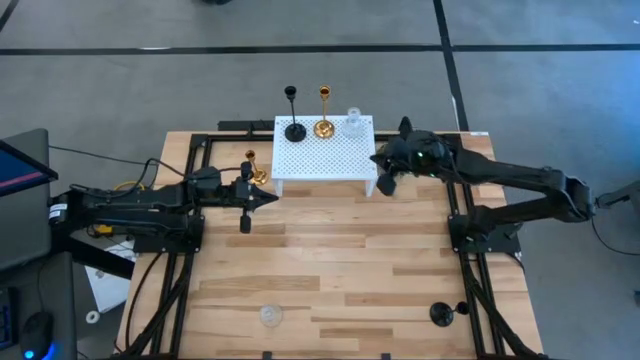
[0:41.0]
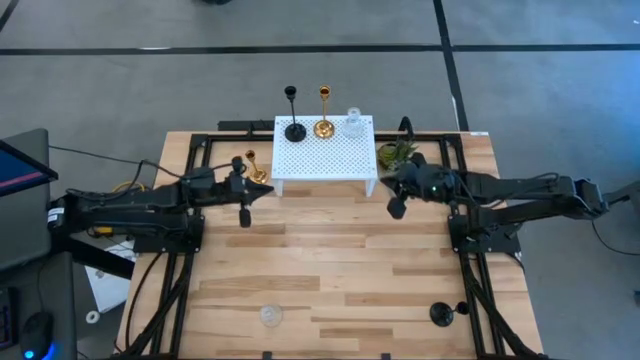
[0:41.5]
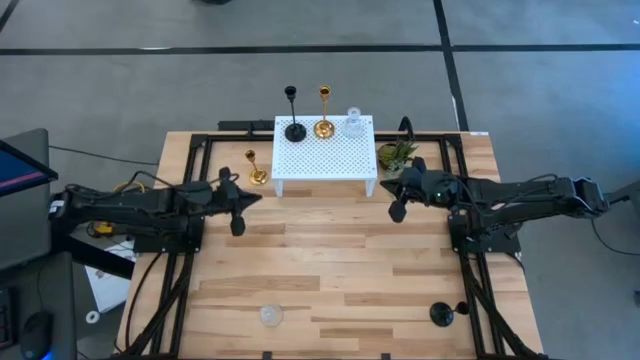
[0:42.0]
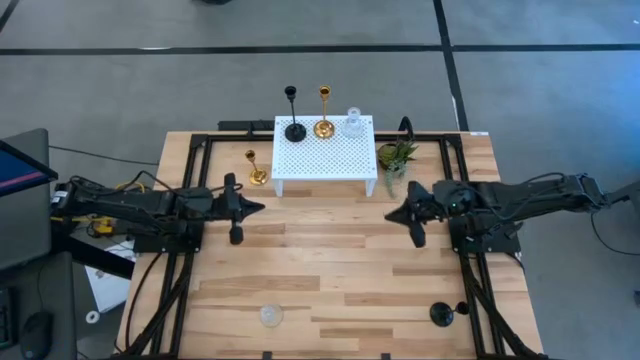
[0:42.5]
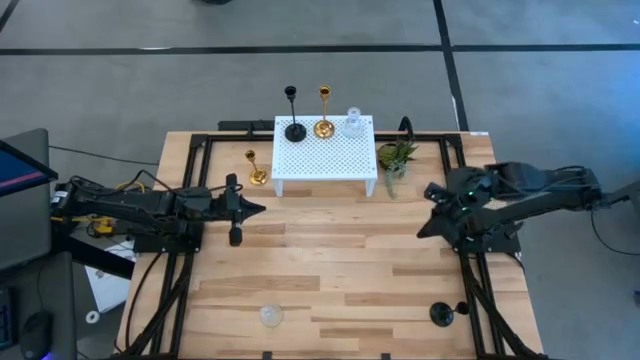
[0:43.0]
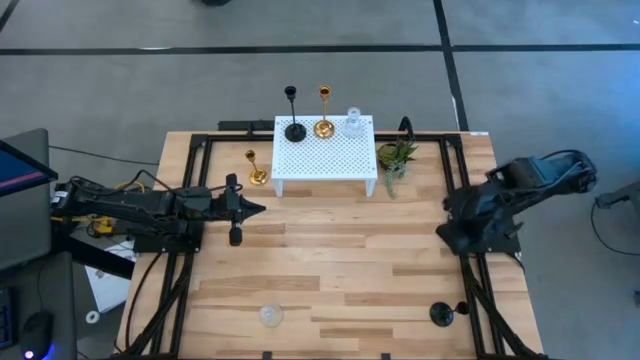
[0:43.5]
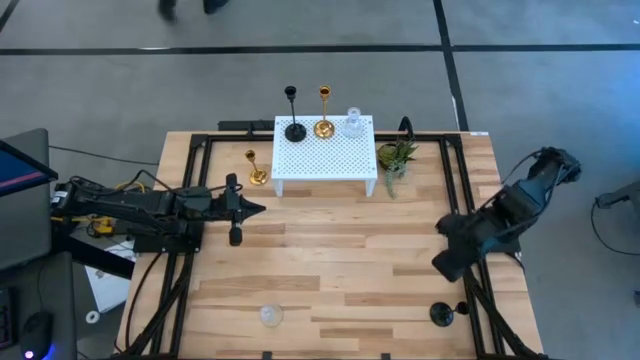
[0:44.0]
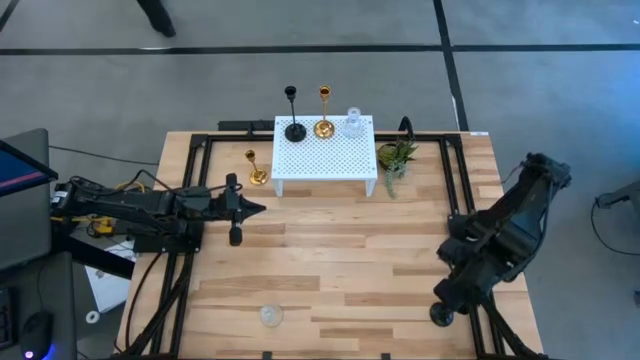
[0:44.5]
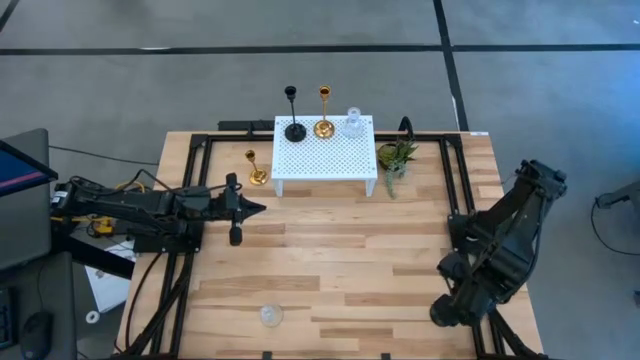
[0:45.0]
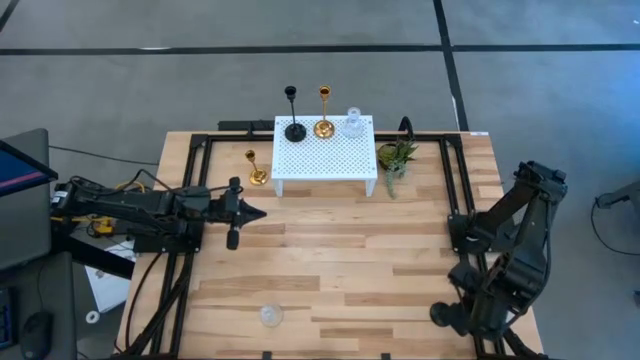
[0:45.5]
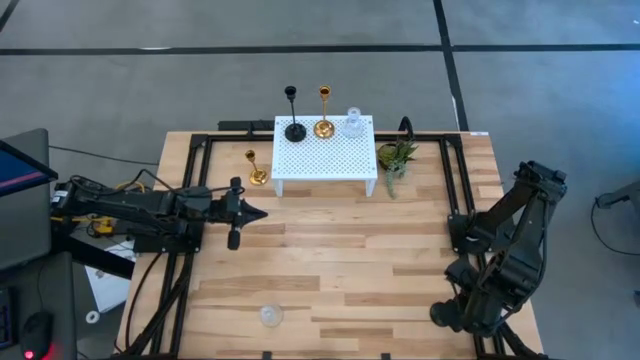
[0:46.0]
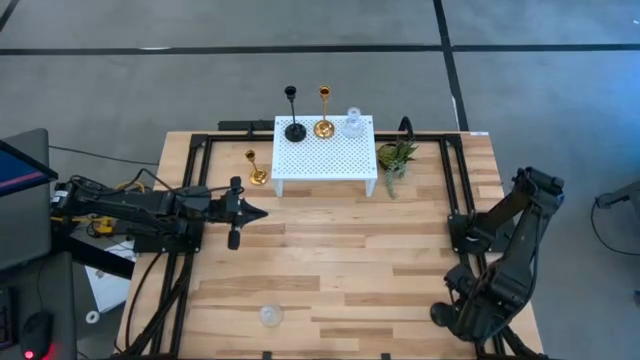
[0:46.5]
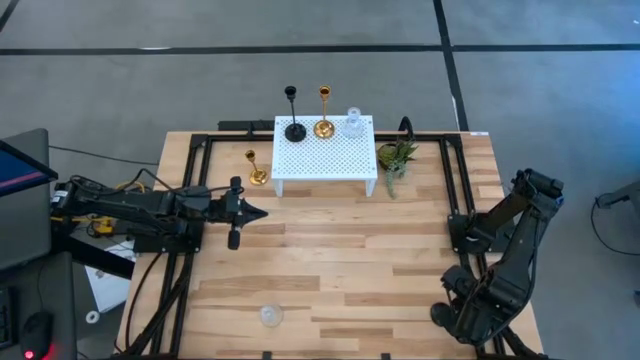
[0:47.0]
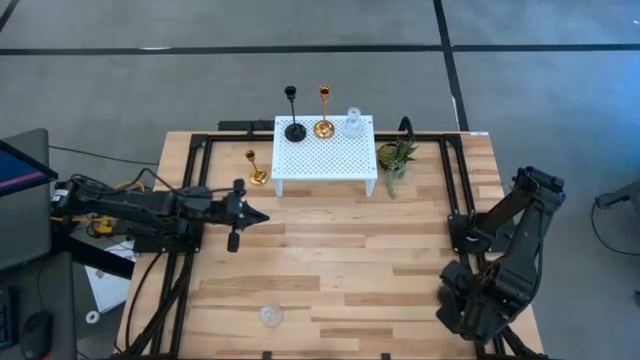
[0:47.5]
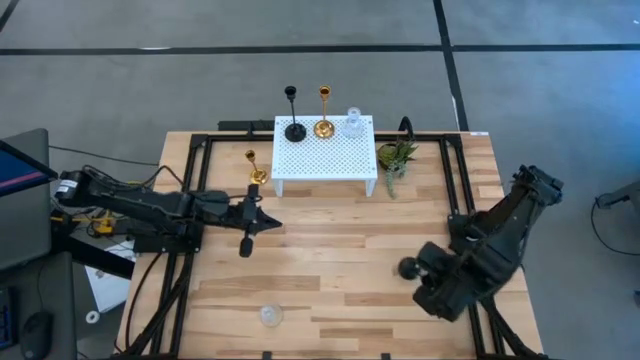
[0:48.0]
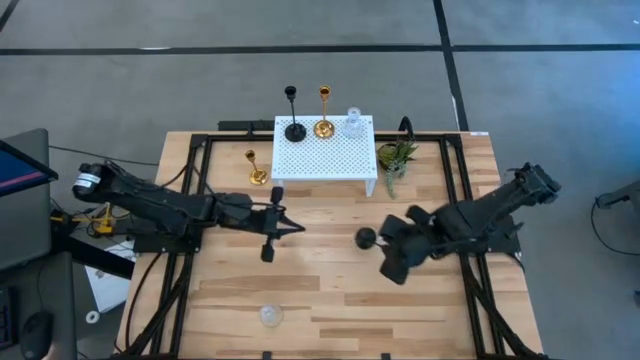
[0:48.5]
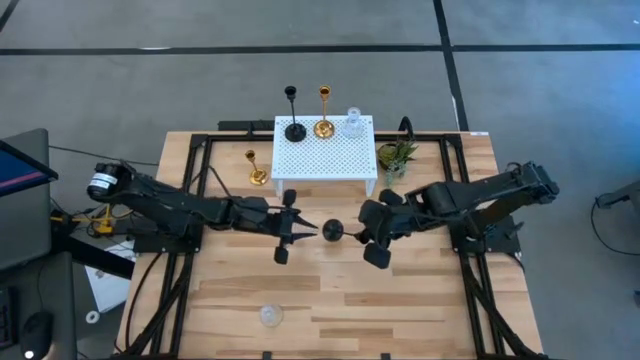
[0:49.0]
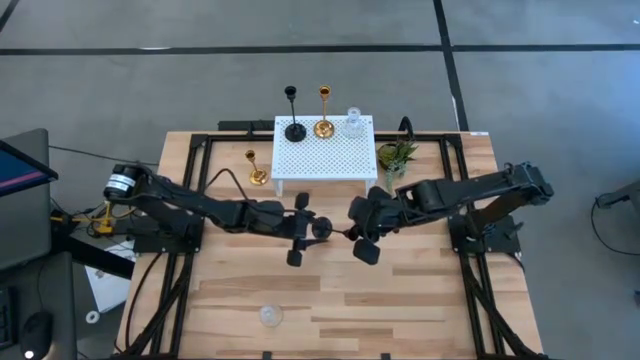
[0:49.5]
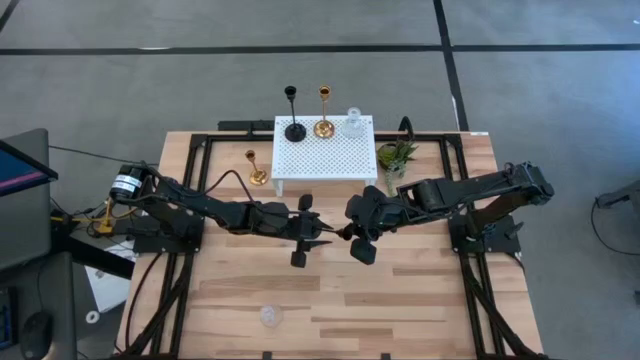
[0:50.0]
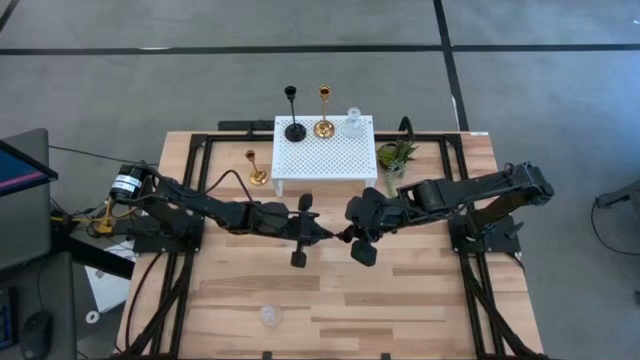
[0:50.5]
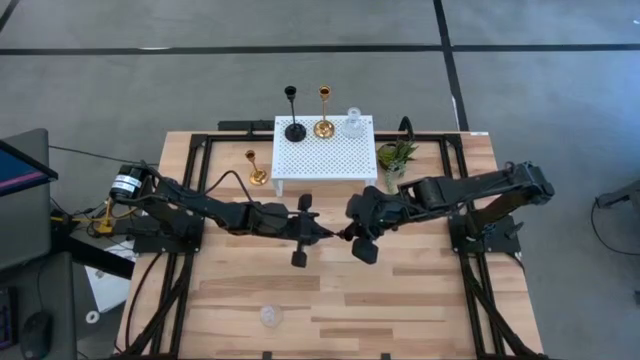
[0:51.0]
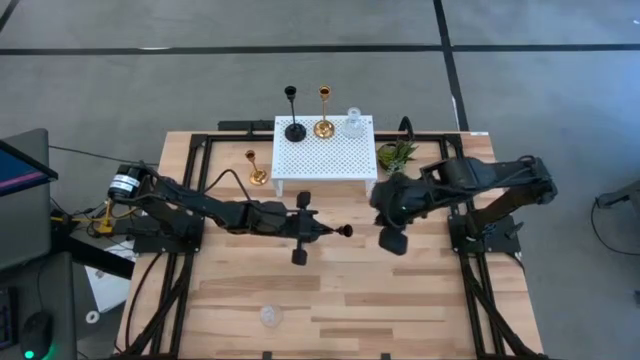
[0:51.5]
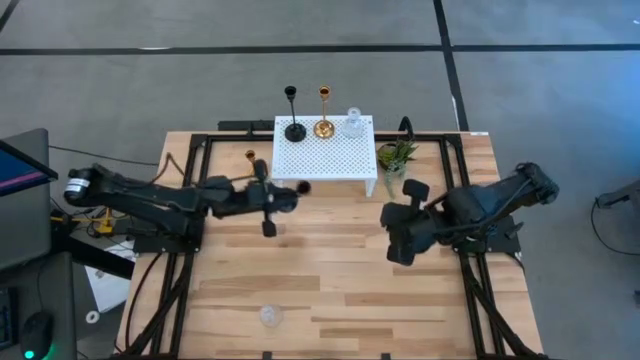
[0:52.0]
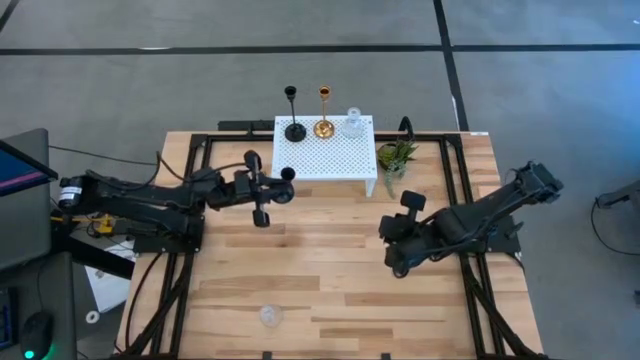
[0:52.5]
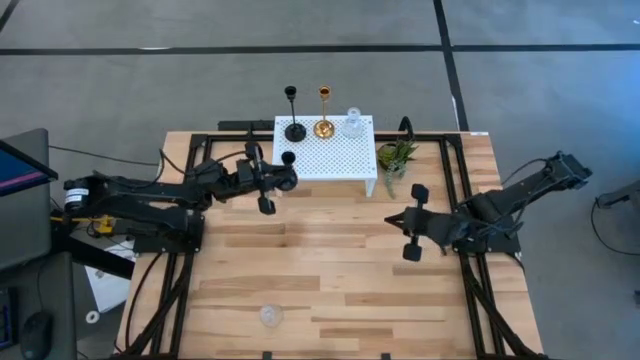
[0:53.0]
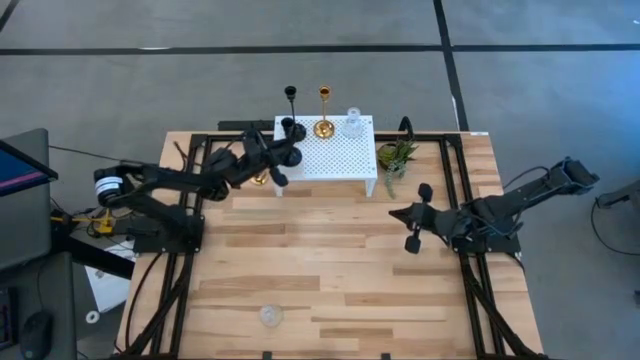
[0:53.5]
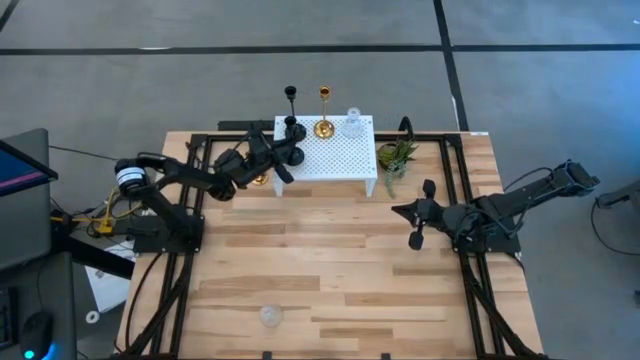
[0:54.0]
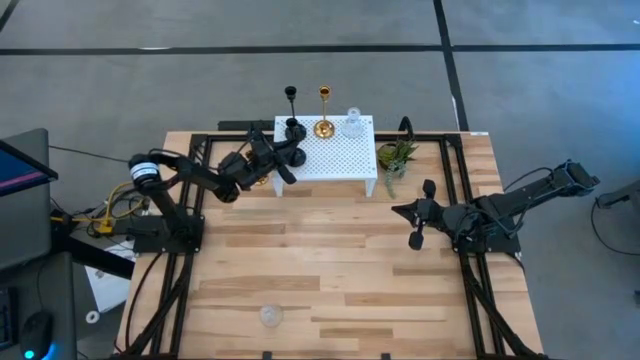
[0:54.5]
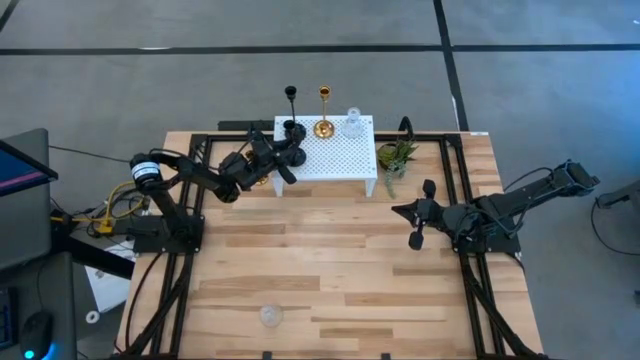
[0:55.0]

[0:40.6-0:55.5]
Task: Pick & Place candle stick holders
Put the black candle holder on the shelf aligned with the other black candle holder

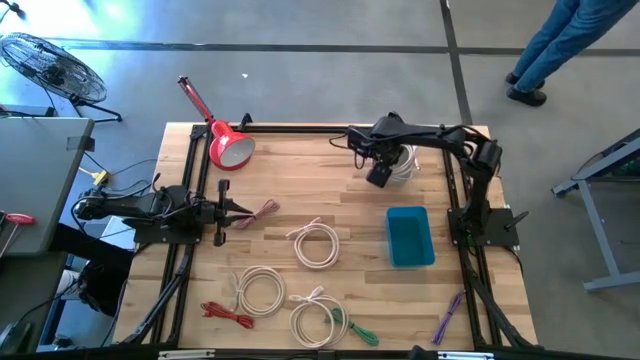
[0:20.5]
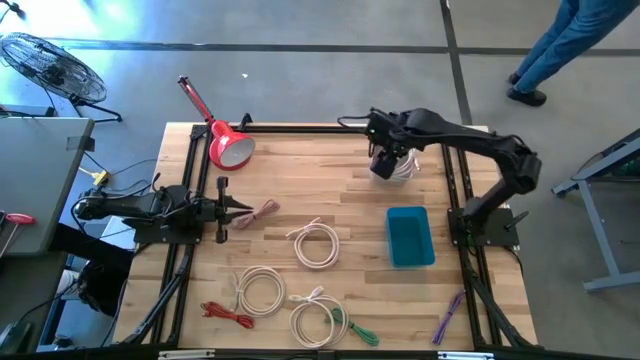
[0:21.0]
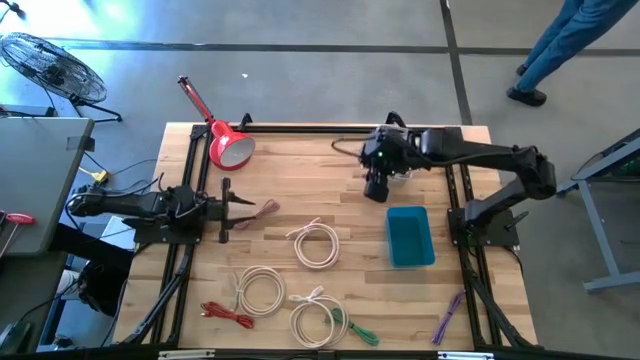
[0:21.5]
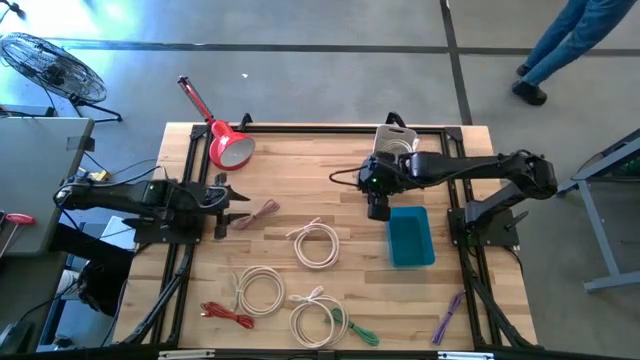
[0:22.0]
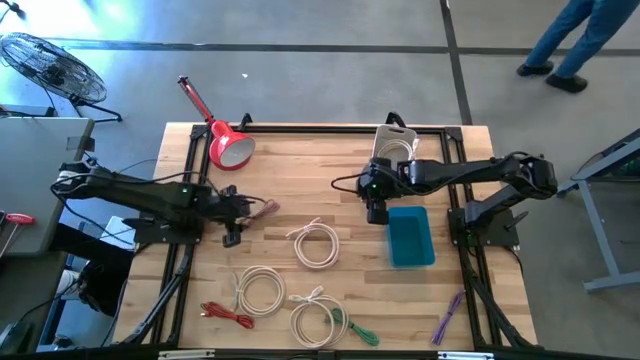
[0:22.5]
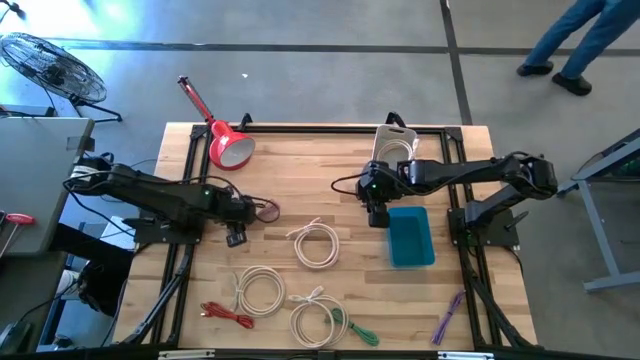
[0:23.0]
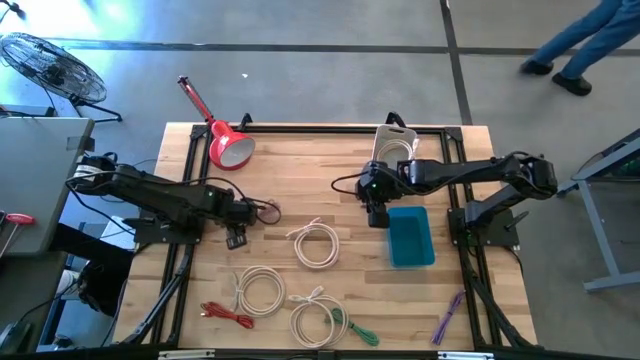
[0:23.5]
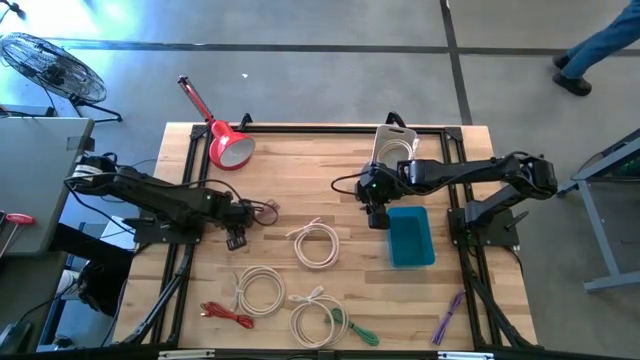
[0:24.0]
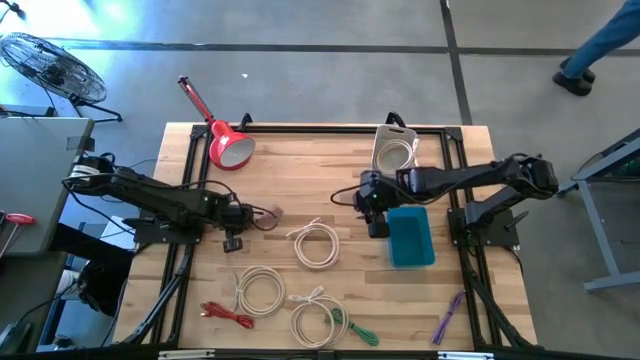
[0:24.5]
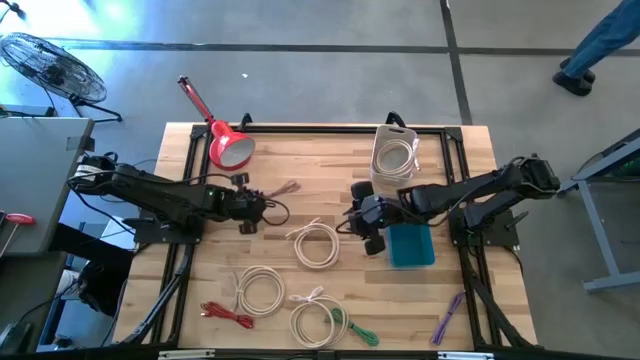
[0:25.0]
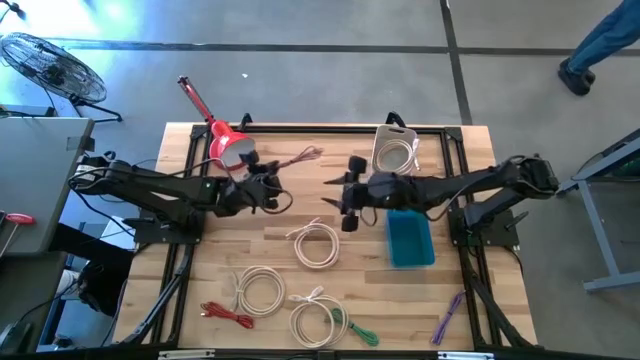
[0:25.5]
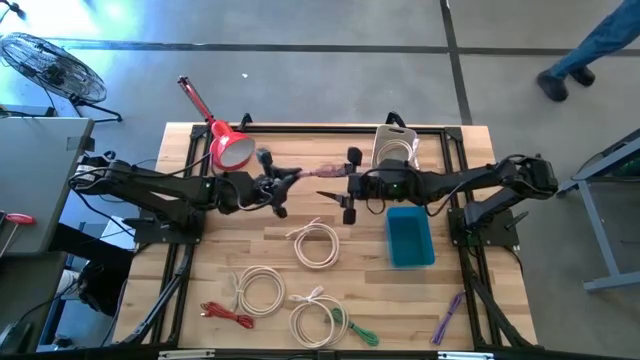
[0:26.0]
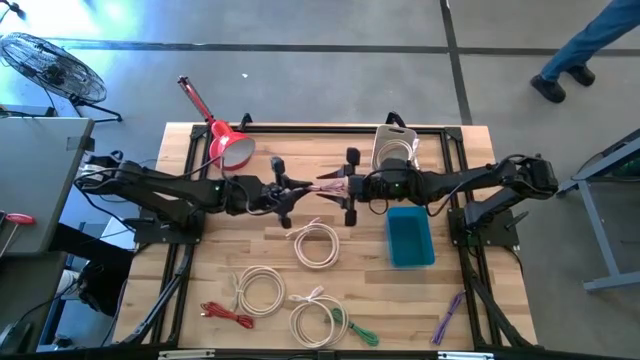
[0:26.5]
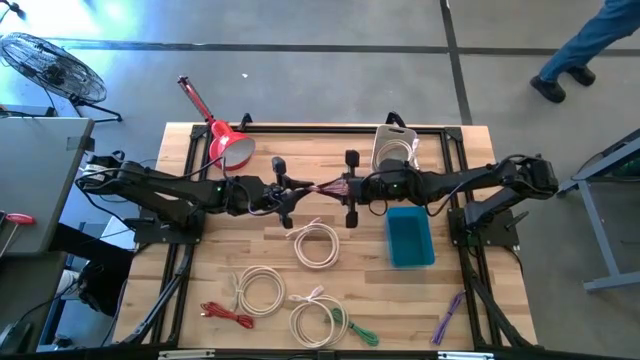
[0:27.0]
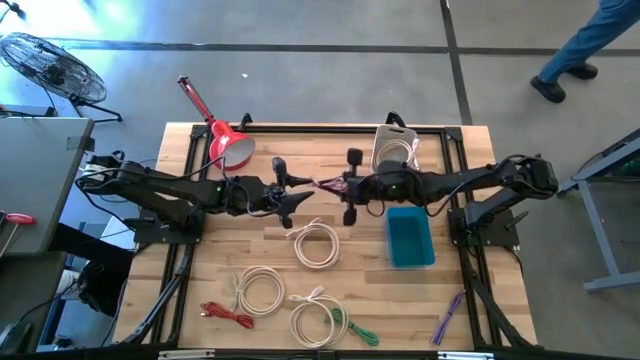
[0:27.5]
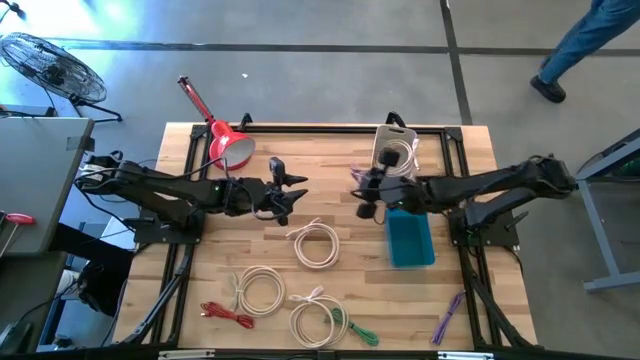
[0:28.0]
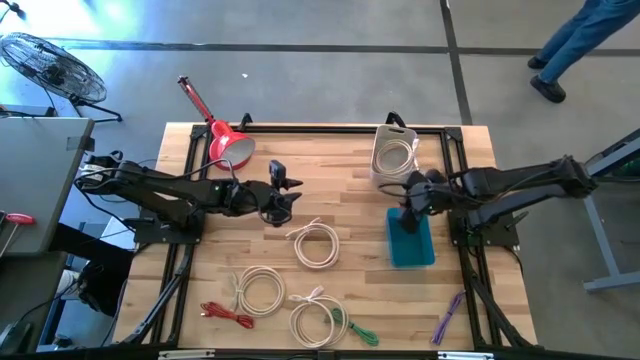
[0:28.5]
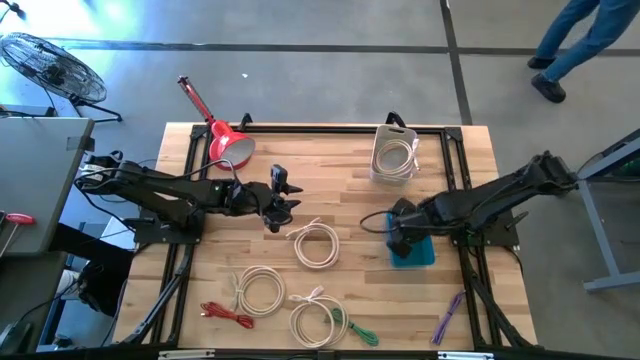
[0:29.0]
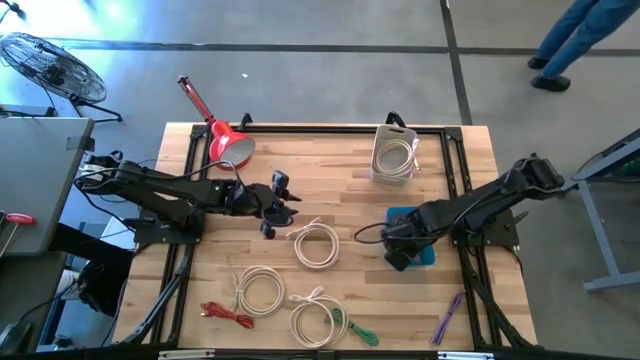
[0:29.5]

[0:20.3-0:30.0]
Task: Pick & Place USB Port
Put the pink charger cable into the blue bin
